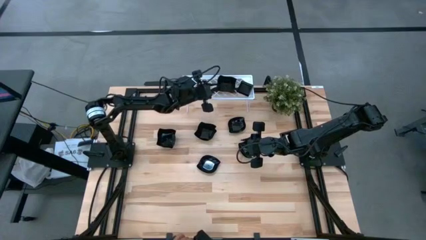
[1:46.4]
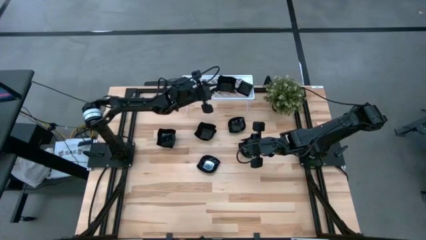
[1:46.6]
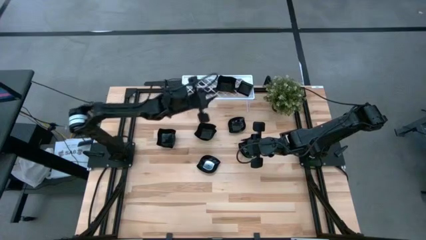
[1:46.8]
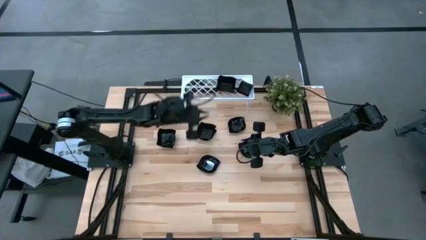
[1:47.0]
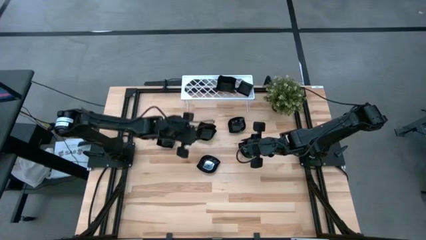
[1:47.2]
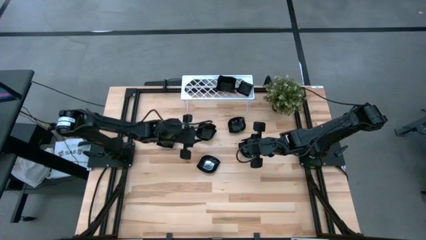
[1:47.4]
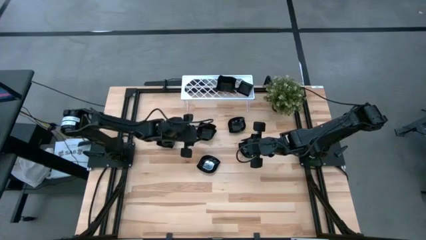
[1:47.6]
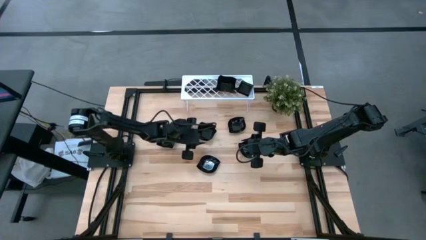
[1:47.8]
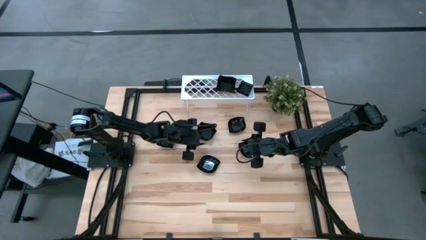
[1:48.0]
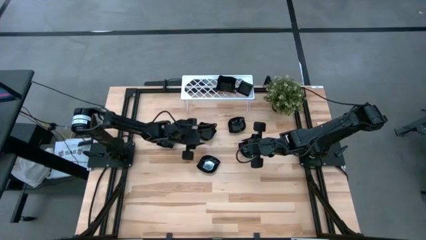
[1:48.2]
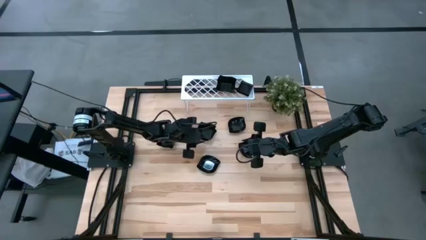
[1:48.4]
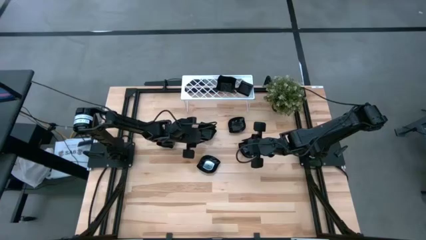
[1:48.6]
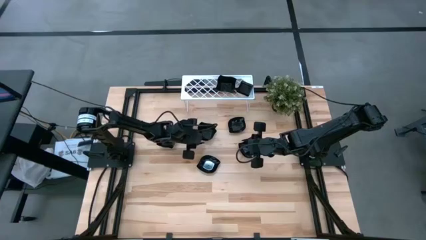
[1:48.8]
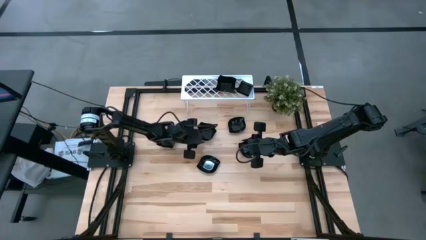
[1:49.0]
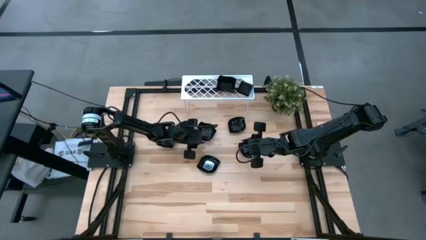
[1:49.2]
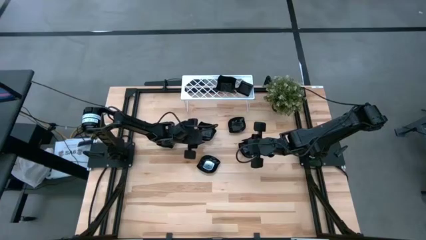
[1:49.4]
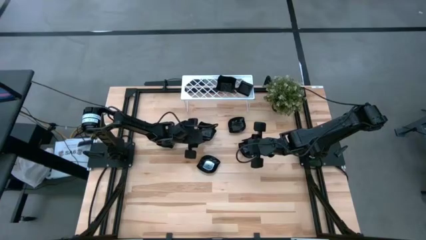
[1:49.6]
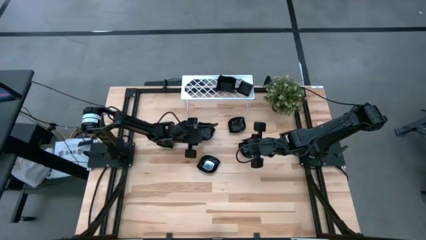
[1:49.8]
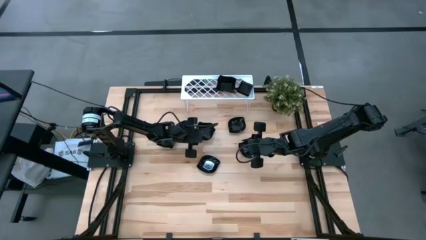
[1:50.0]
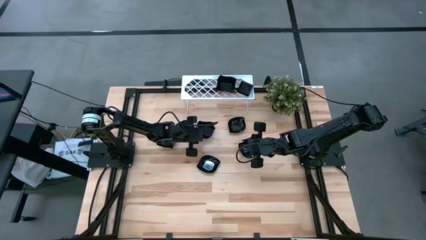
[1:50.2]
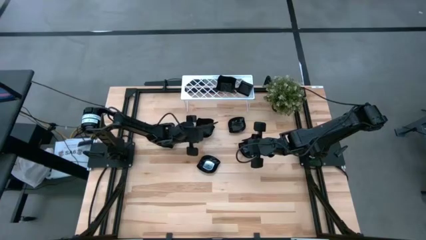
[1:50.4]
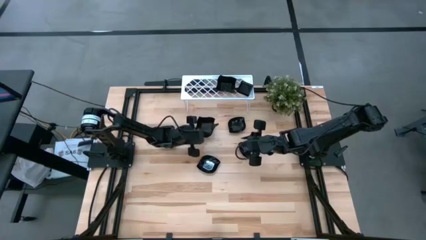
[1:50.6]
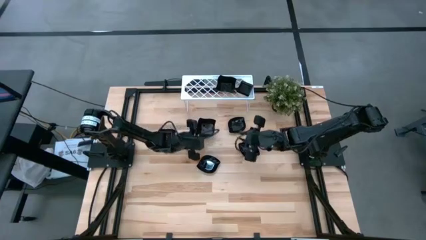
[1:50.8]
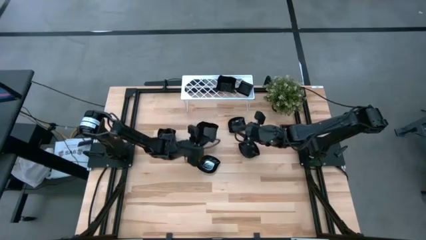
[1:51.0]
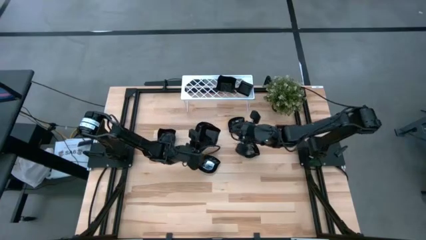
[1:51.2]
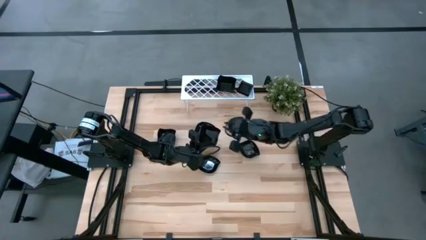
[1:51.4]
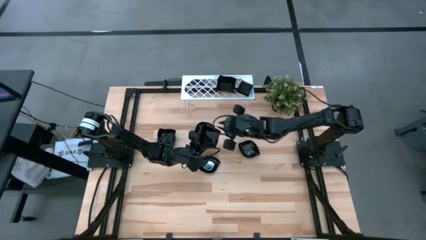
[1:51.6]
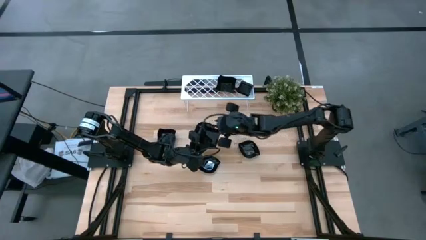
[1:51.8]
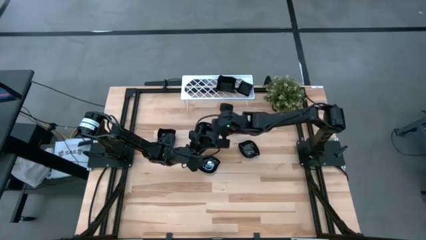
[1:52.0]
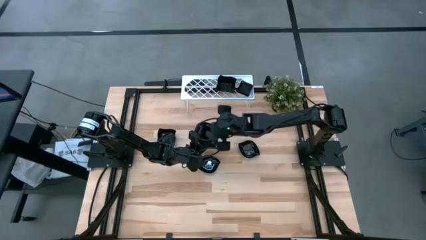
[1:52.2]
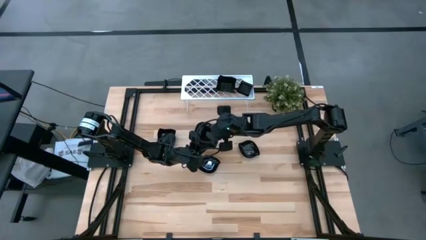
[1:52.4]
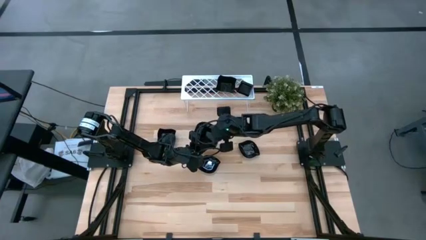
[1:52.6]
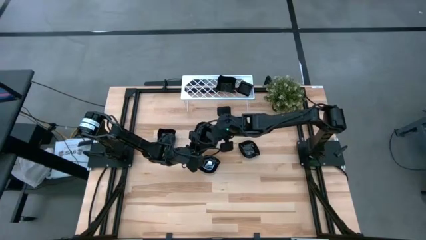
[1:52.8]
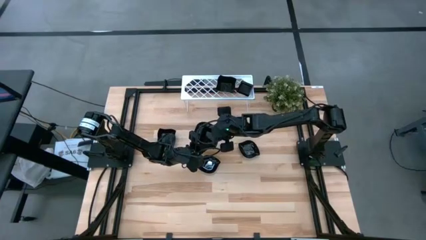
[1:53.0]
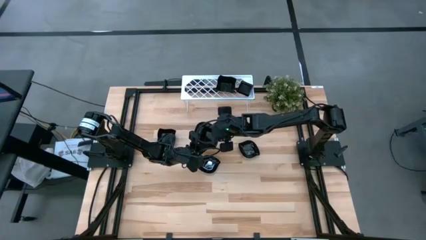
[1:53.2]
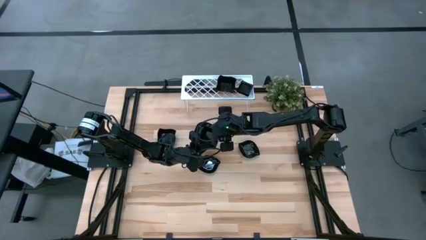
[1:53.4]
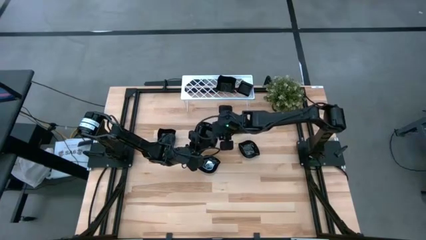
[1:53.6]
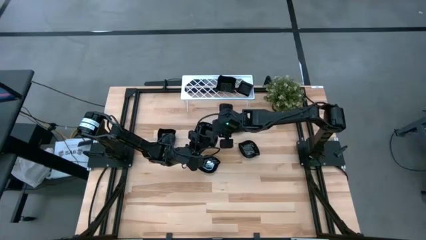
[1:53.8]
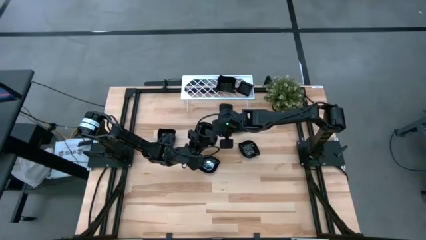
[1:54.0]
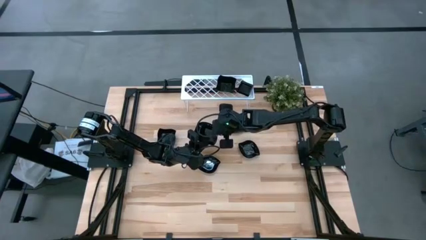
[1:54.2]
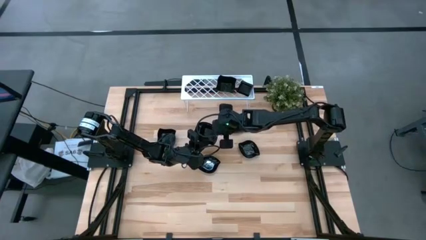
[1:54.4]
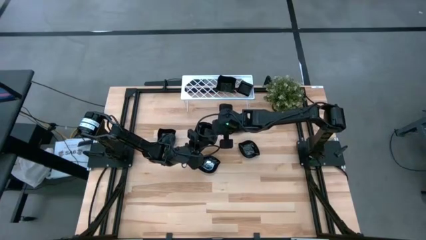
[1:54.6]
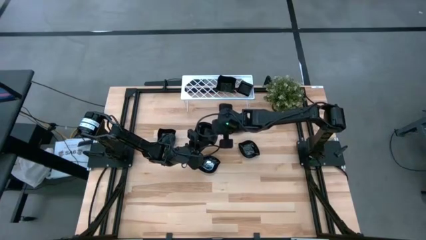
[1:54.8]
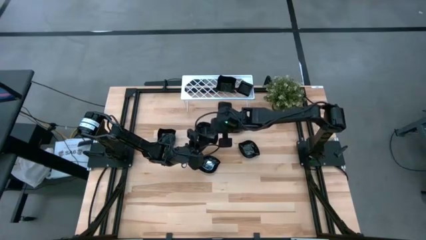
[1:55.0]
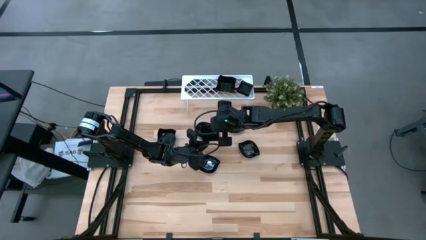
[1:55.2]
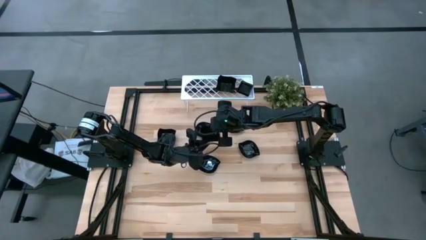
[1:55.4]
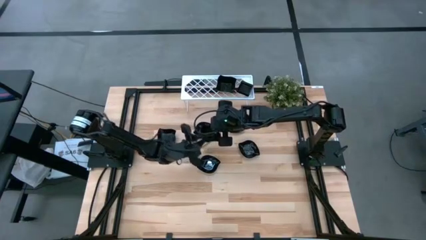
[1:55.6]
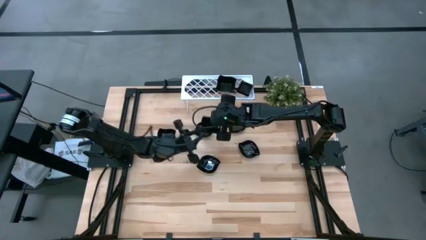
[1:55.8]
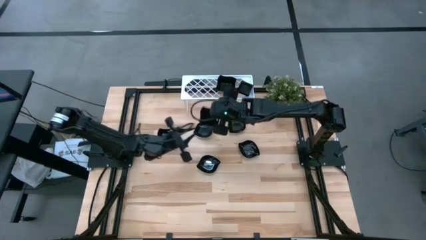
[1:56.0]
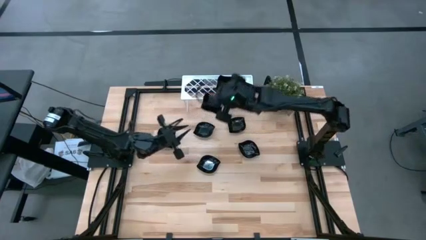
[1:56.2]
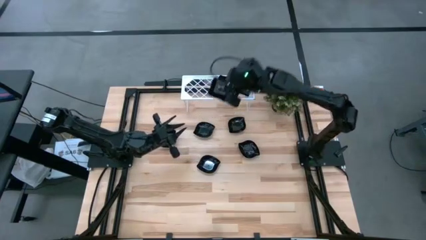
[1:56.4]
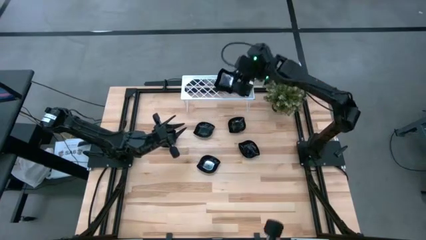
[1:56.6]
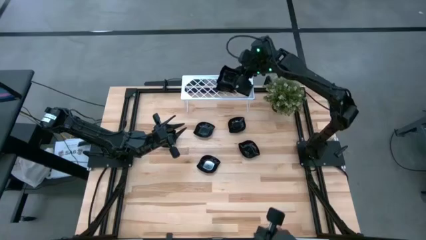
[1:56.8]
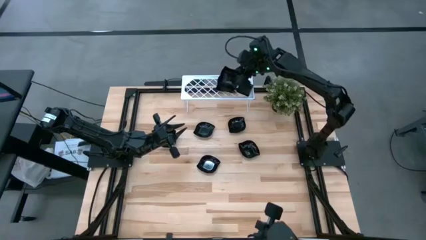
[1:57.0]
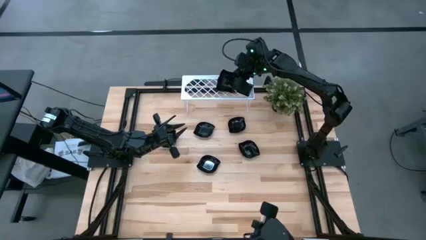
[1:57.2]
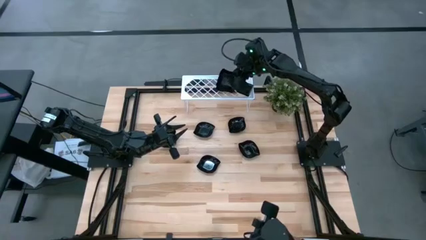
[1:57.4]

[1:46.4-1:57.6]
Task: Pick & Place Mini shaped plates
Stack the black distorted square plate on top of the black distorted square plate on the shelf

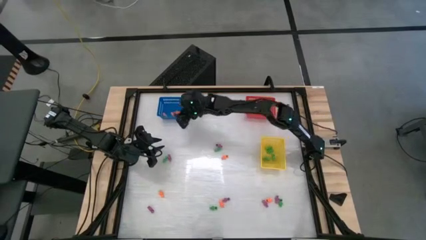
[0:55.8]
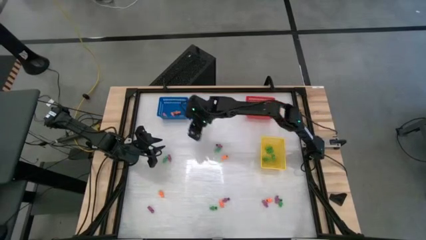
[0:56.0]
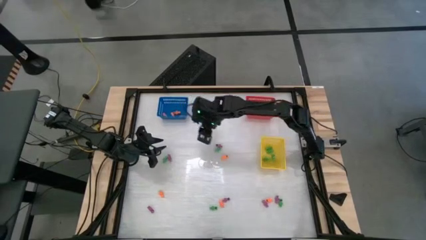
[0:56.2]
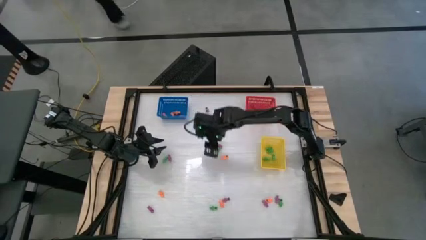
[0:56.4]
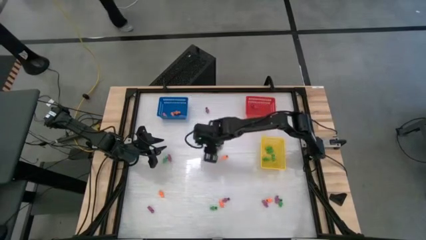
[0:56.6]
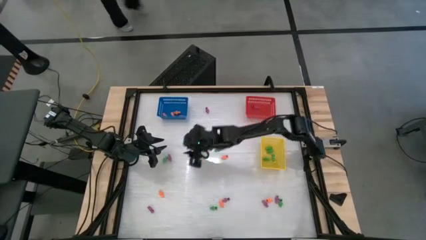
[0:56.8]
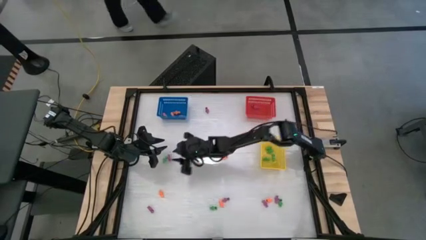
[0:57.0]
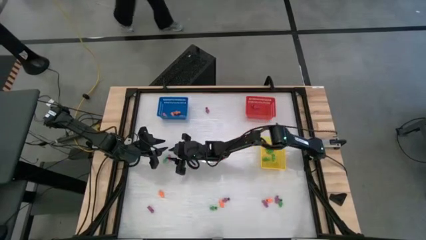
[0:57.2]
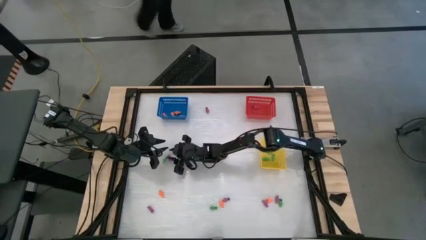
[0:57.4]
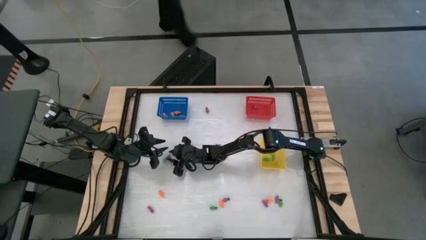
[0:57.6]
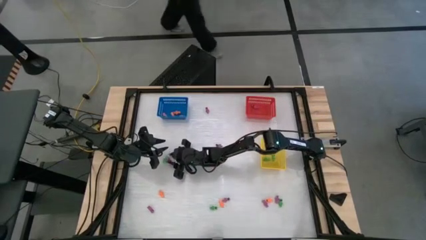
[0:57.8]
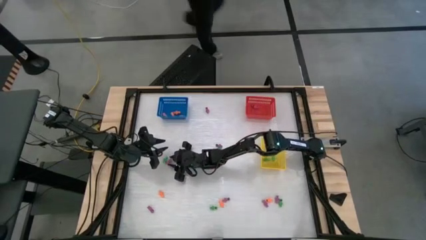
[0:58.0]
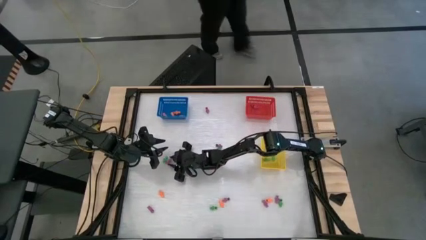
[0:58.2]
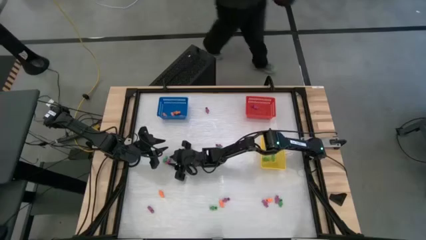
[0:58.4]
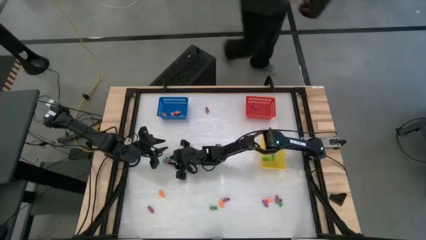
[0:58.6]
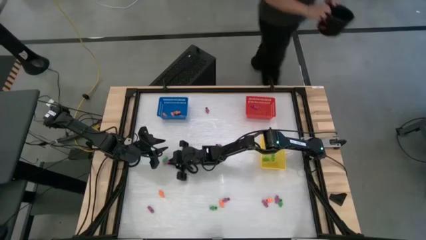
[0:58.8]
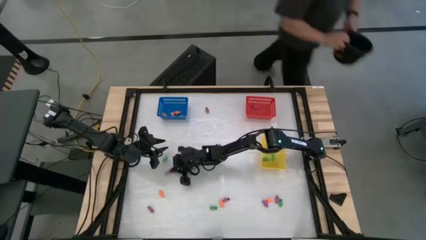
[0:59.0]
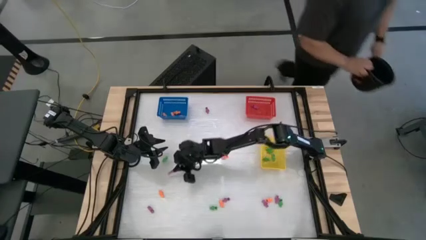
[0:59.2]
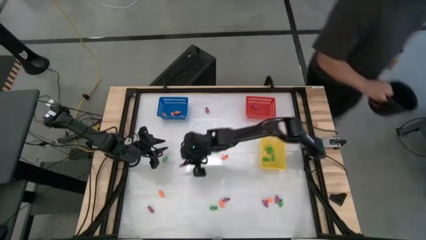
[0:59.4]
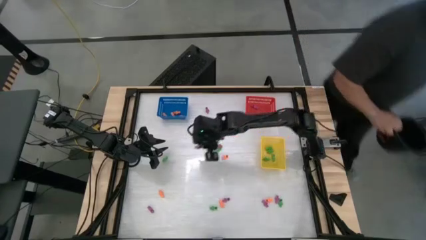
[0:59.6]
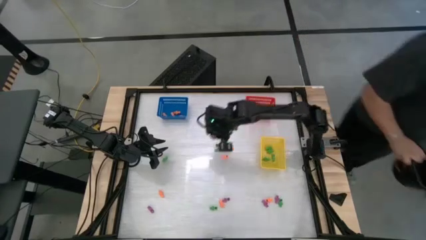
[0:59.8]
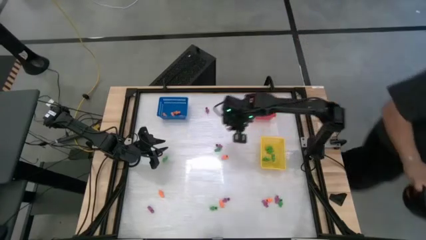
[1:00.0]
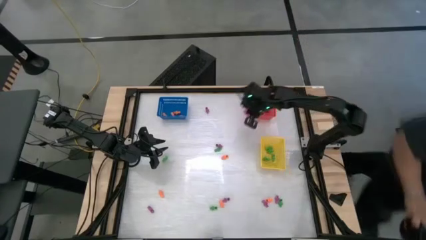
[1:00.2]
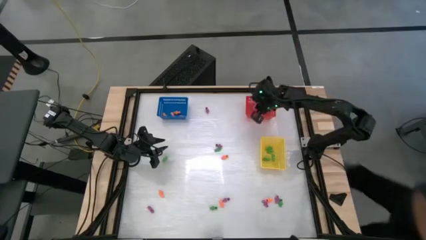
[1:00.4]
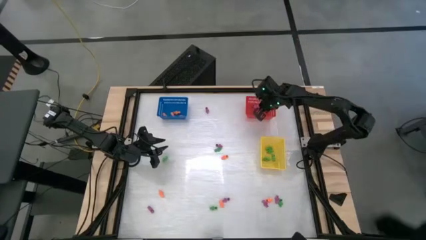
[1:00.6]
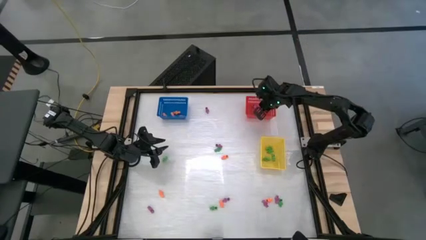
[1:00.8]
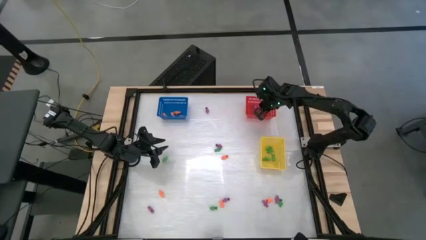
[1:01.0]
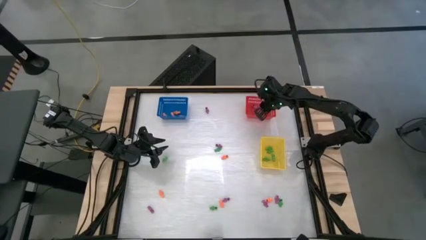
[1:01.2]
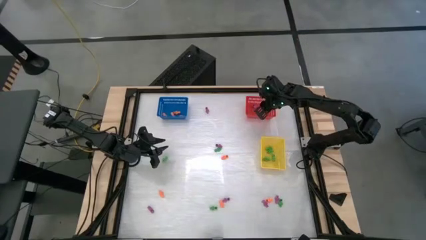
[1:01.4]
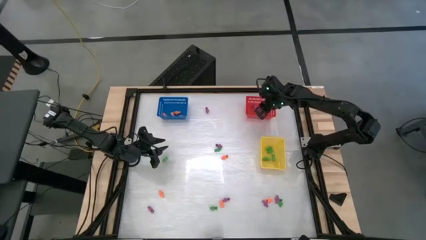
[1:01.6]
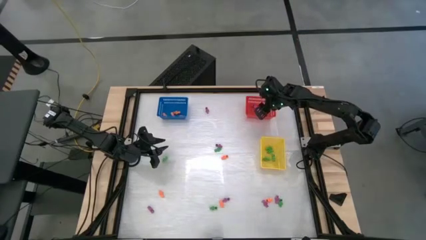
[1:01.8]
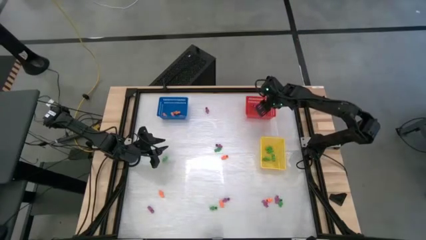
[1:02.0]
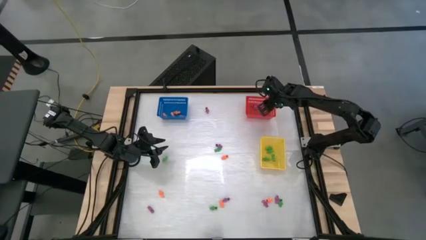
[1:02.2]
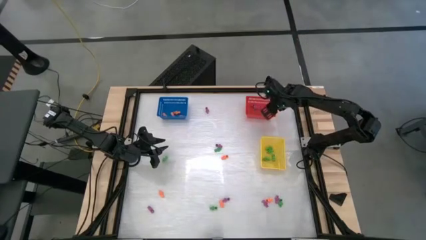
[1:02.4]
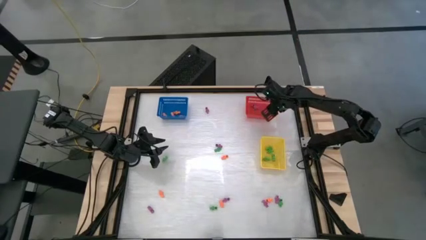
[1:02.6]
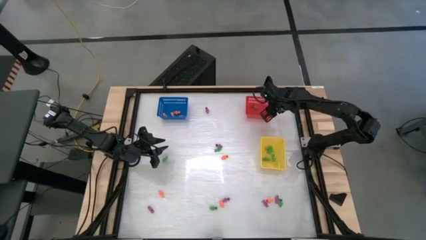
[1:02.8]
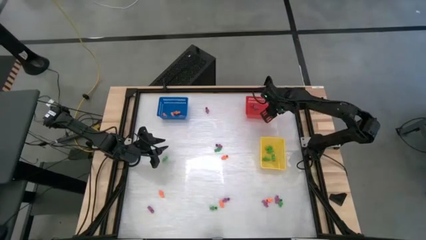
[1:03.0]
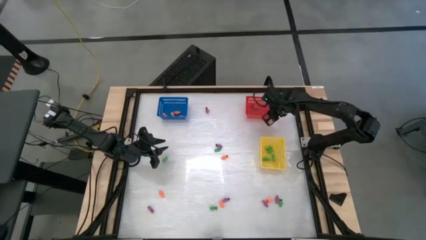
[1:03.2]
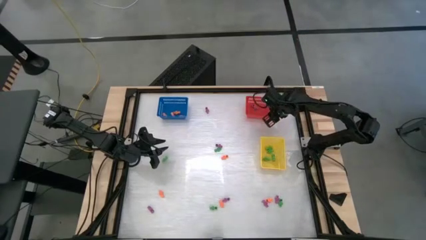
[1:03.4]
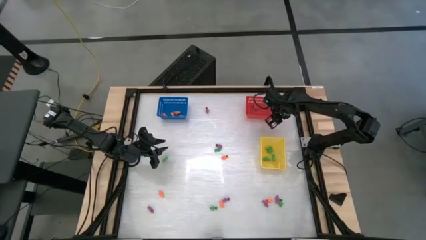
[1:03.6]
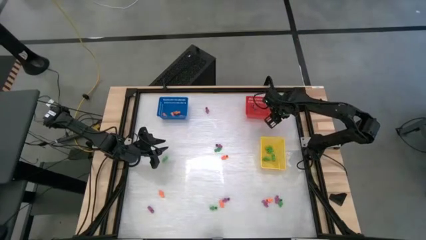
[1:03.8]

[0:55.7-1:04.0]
Task: Sort Halloween decoration
Put the purple skeleton toy into the red bin
